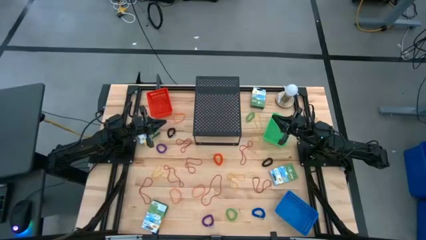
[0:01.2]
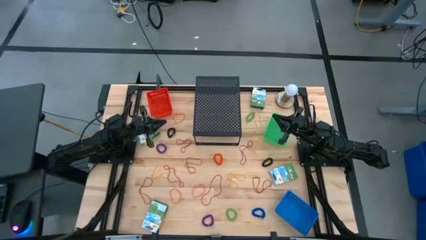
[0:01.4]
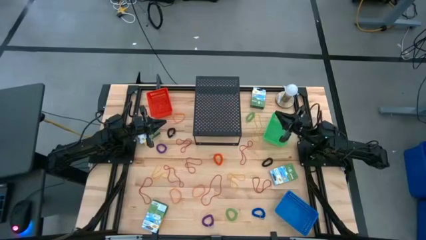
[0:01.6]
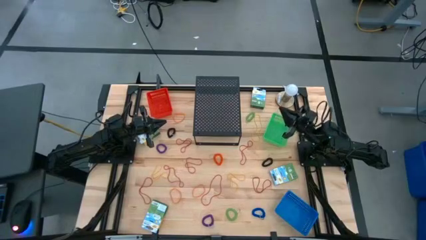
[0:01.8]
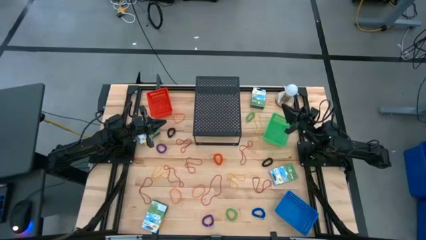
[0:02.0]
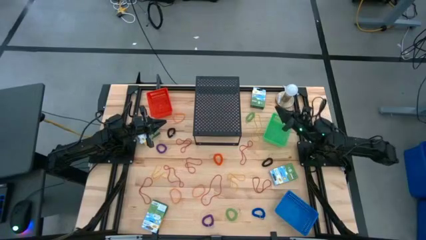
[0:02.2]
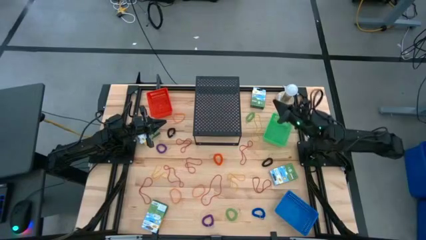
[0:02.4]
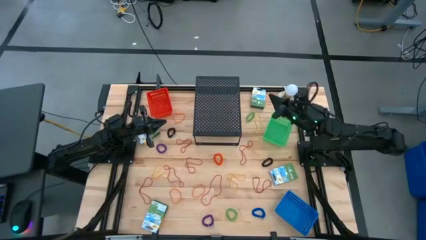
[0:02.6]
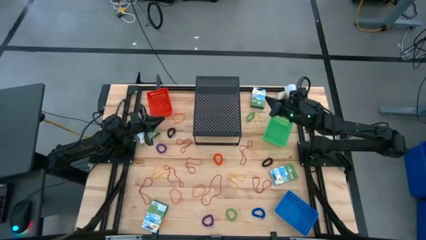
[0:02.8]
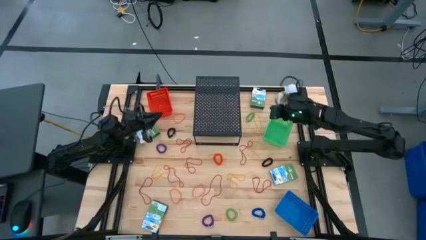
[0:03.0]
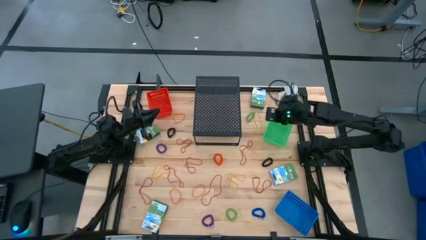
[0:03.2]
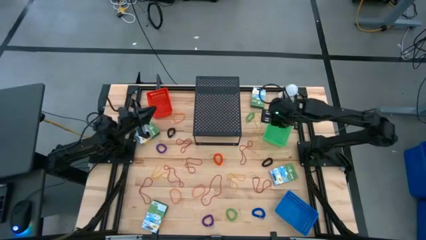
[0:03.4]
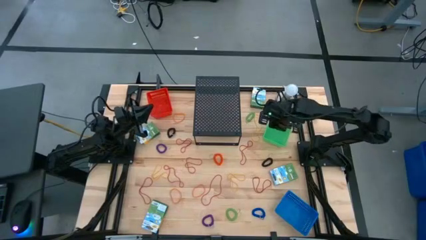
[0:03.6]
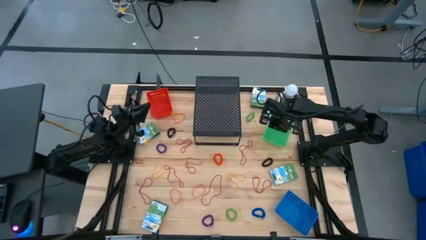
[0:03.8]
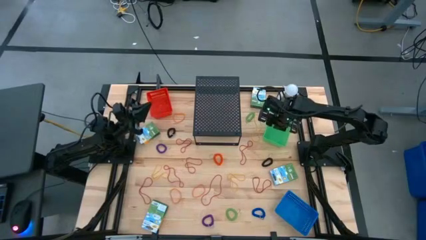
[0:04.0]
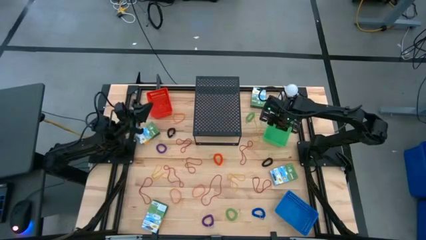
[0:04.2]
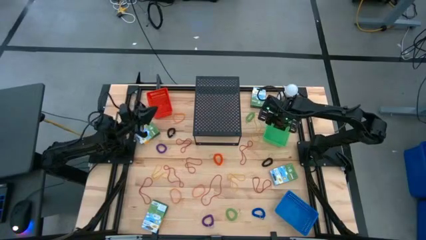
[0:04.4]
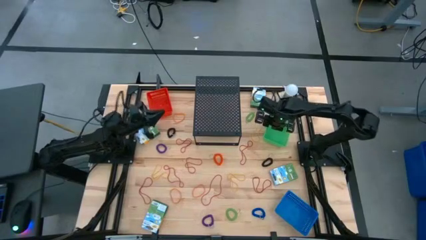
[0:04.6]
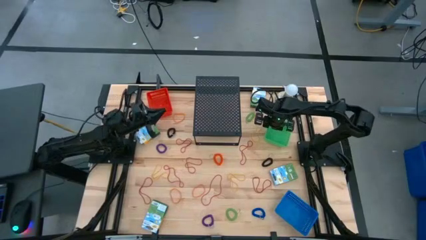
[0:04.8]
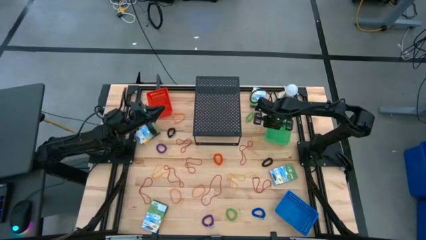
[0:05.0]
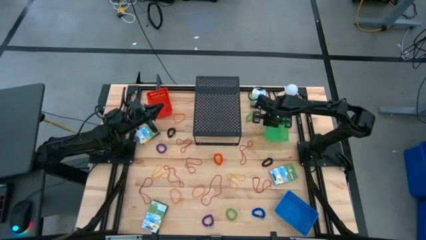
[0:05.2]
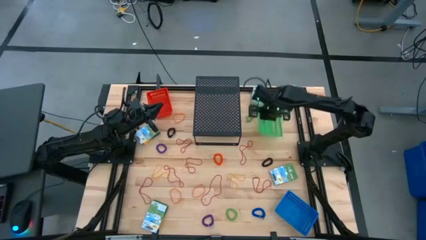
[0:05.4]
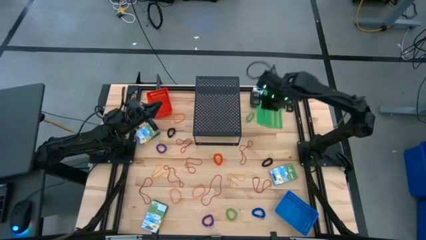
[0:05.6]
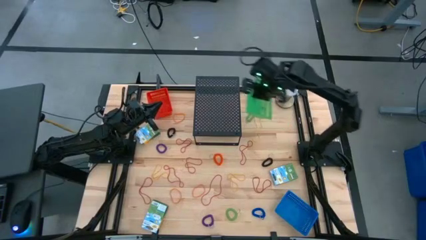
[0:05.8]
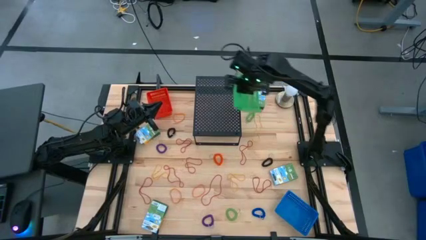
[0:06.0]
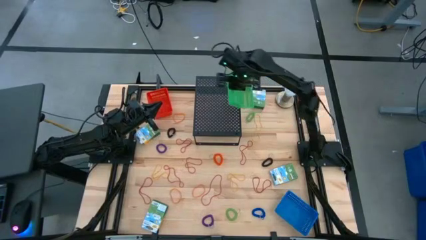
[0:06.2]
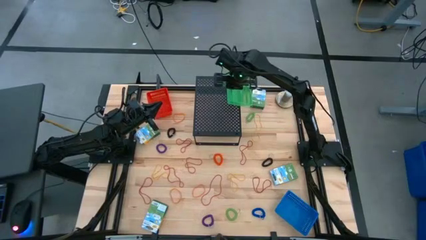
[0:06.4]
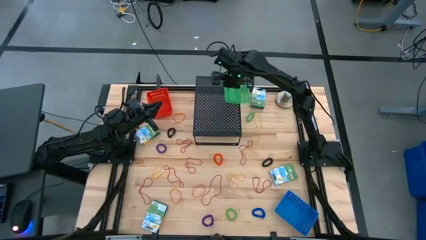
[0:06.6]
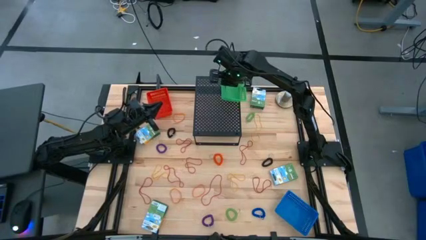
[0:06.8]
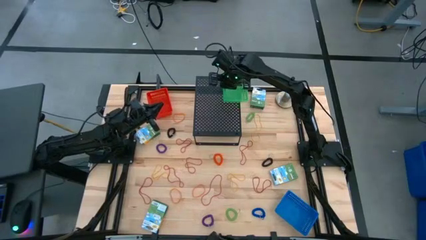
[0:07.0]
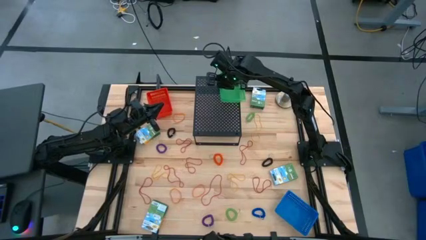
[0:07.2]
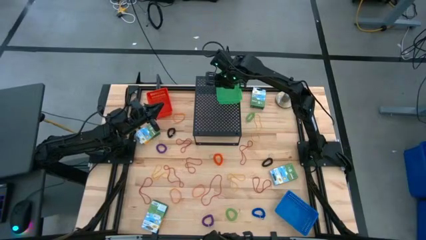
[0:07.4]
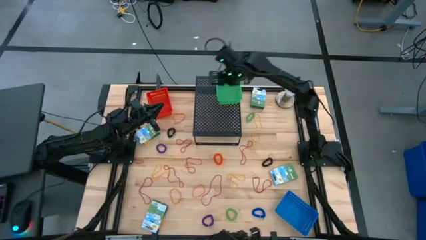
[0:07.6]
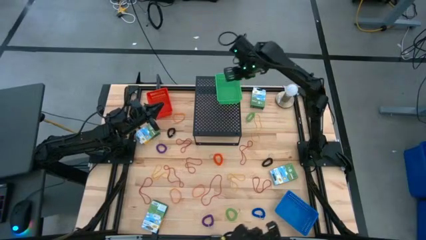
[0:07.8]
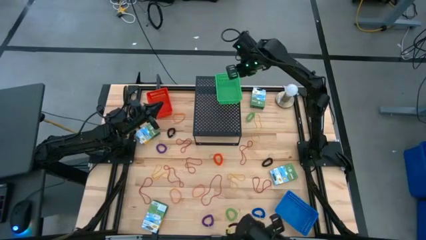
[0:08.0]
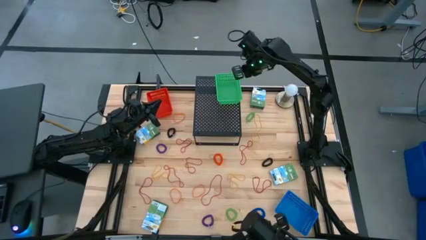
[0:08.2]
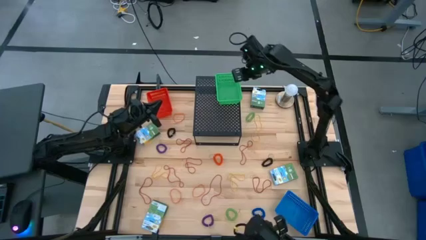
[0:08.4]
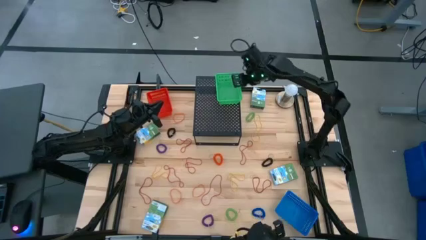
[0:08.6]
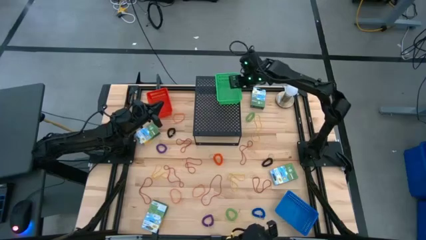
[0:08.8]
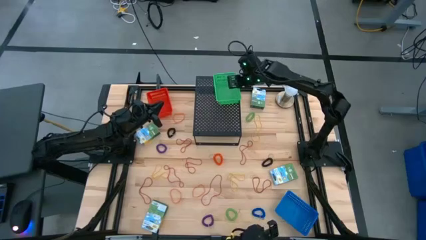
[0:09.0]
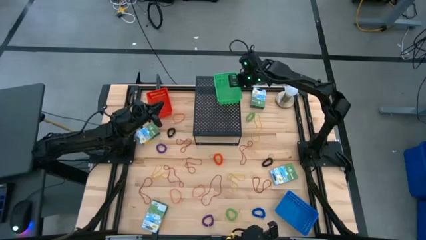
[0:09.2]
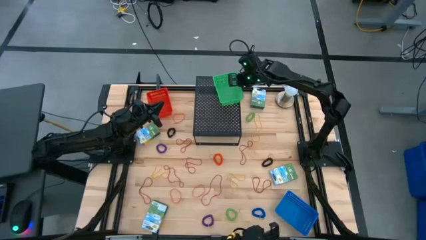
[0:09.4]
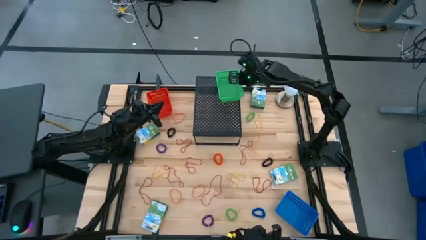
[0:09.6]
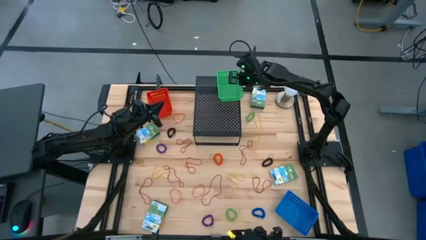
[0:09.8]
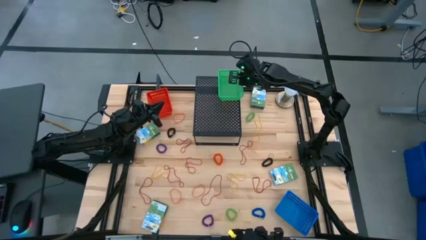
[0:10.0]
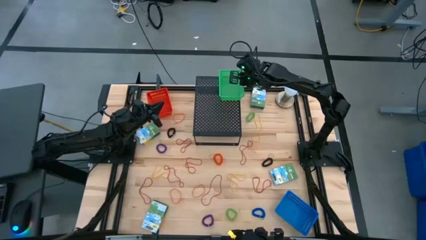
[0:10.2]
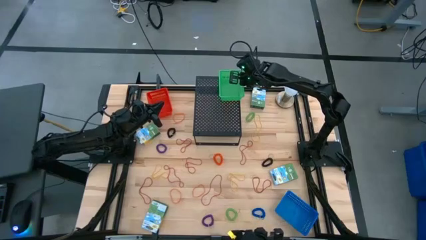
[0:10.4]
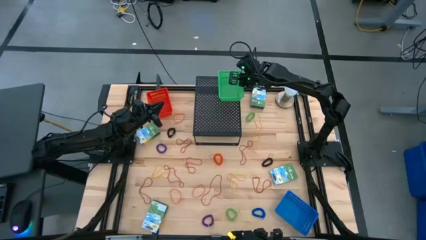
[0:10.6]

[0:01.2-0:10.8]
Task: Pick & Place Office Desk Supplies
Put the green bin on the shelf

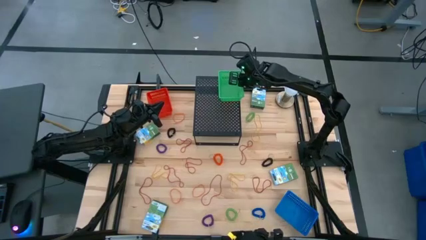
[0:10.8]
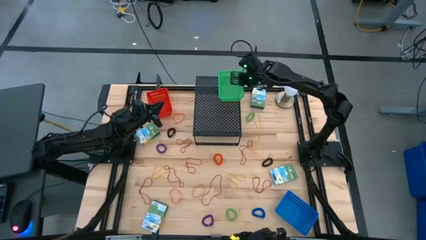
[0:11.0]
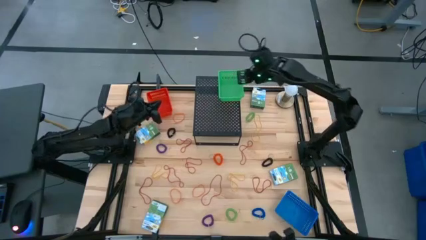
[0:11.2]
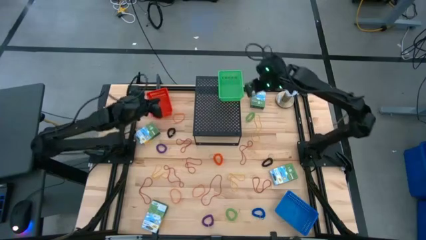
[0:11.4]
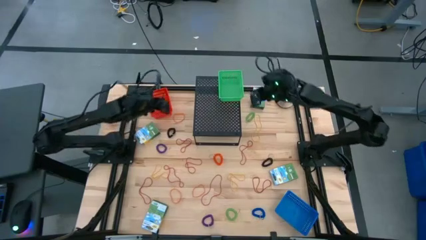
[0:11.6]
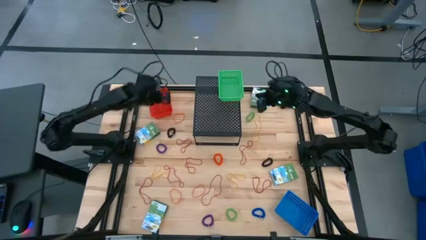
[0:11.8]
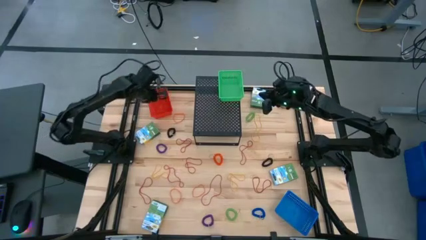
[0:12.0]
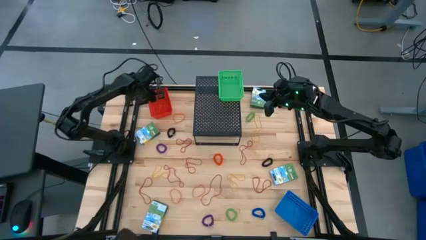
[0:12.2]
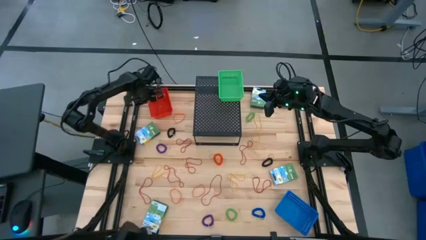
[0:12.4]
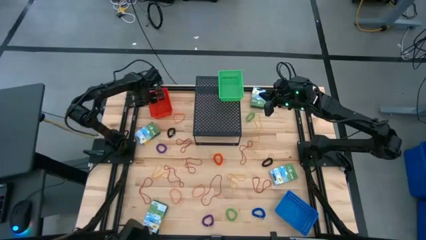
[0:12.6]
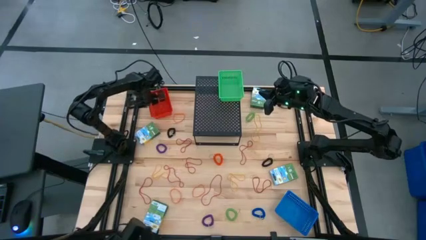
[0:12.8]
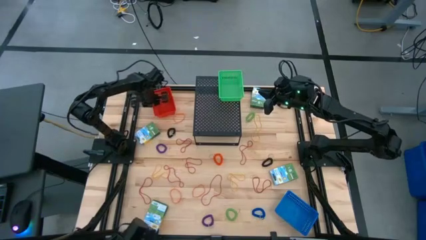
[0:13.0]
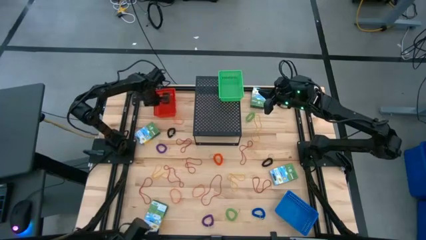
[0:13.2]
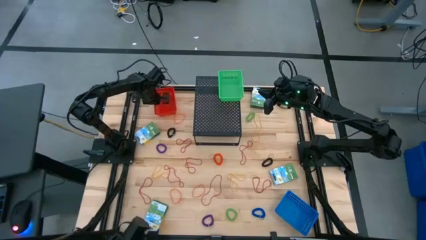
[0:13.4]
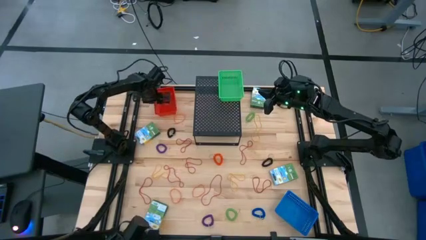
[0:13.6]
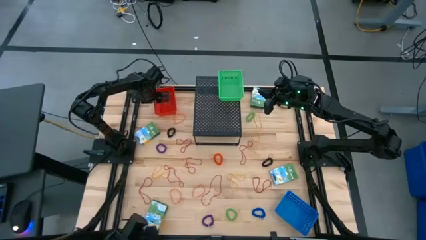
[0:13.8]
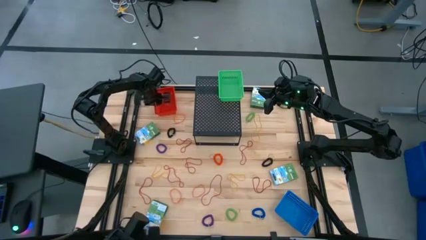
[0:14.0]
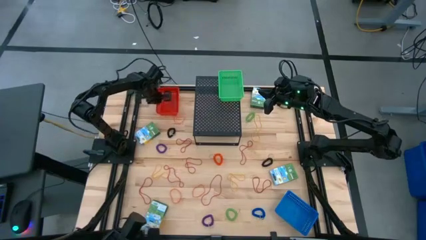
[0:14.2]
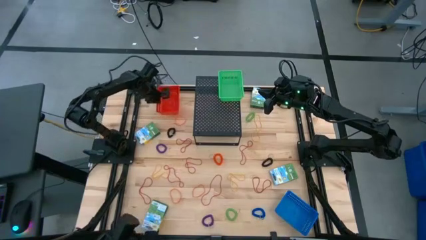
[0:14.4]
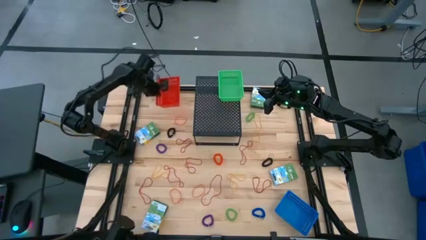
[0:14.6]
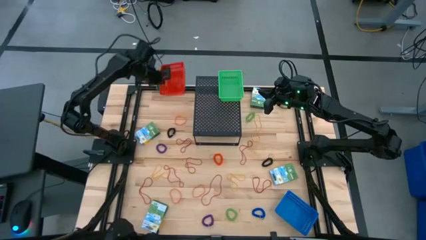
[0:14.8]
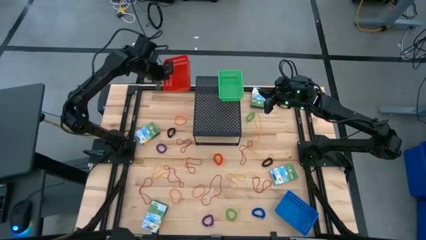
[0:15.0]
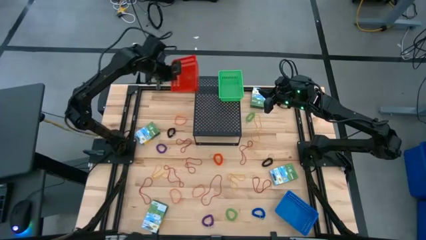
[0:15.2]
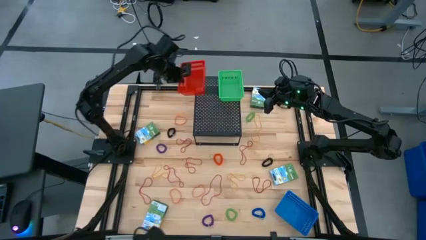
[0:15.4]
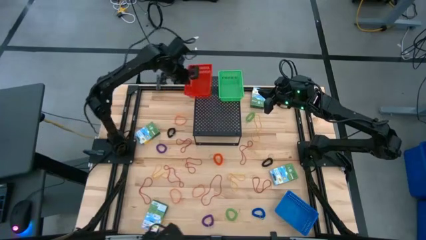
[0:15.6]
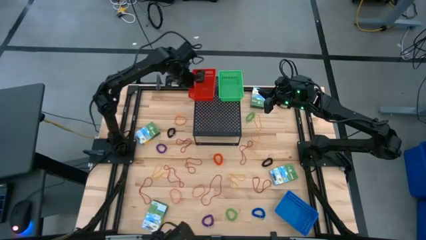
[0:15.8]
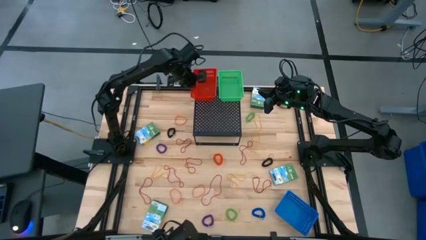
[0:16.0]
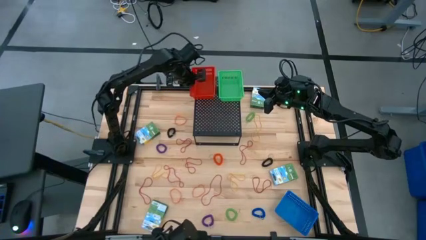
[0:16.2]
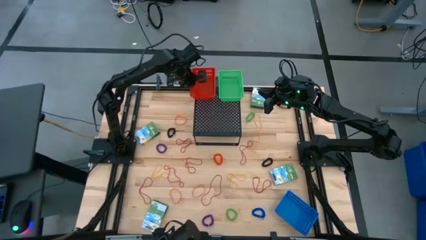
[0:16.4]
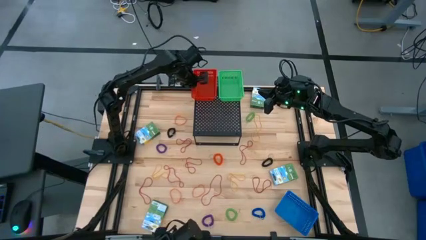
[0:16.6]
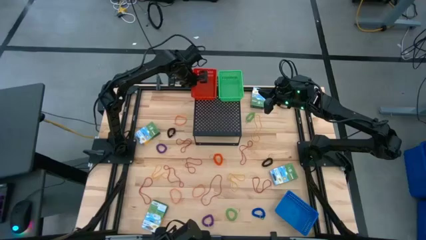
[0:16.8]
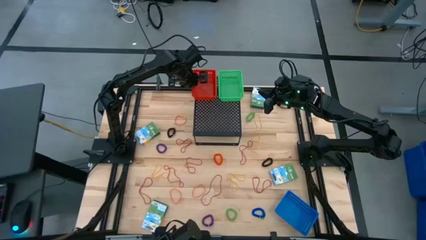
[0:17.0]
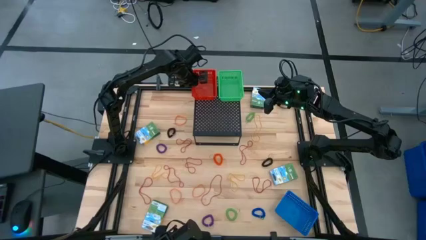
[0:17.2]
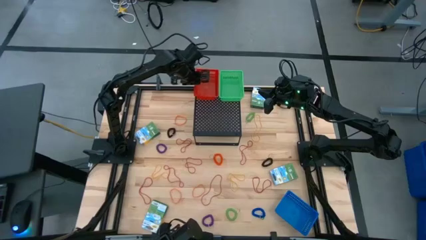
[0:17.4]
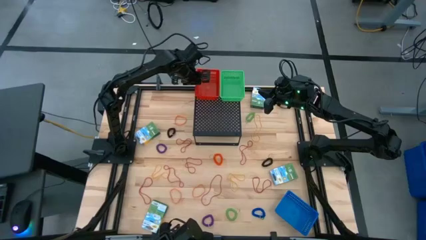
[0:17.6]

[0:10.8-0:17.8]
Put the red bin on the shelf
